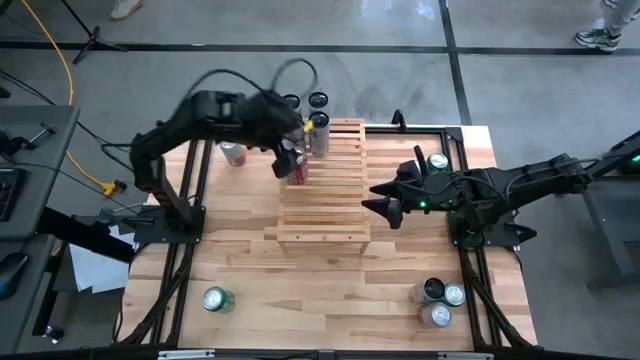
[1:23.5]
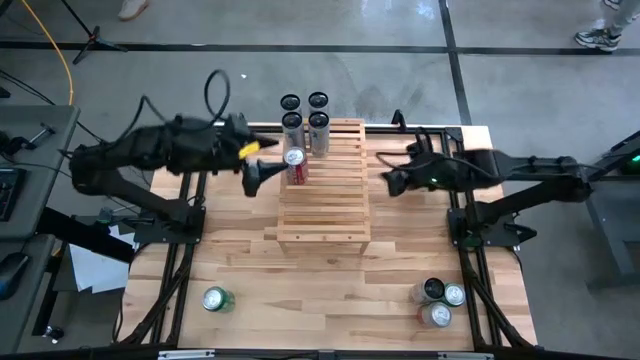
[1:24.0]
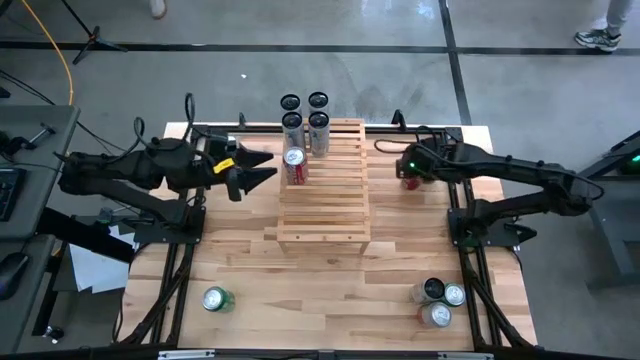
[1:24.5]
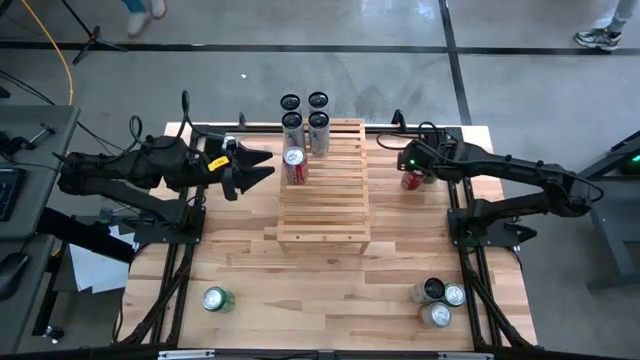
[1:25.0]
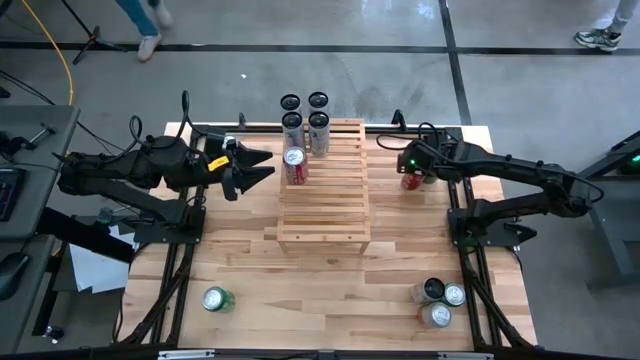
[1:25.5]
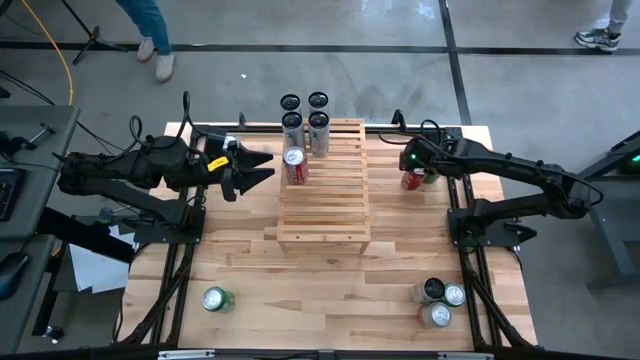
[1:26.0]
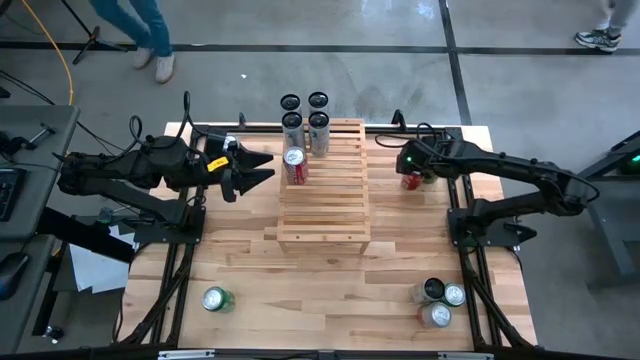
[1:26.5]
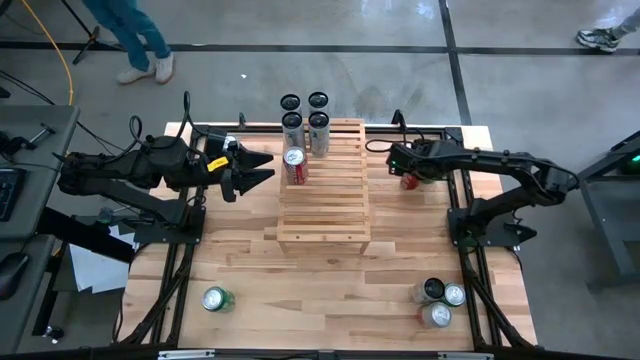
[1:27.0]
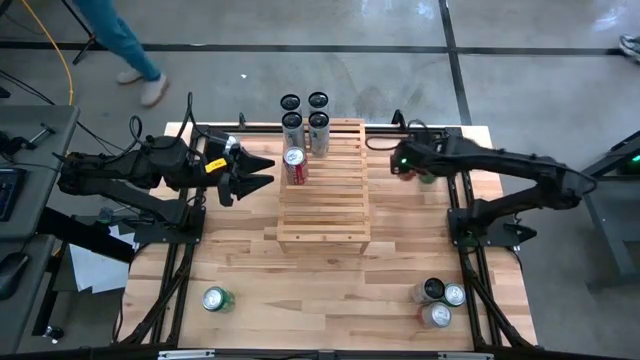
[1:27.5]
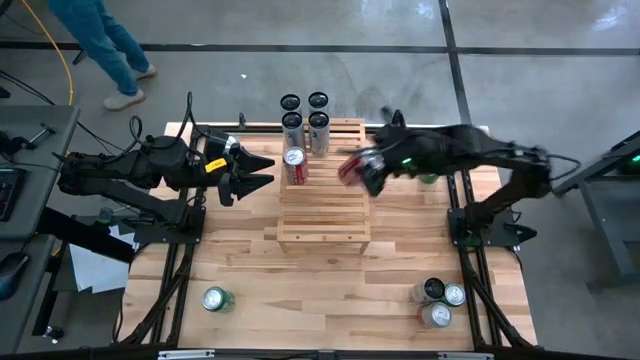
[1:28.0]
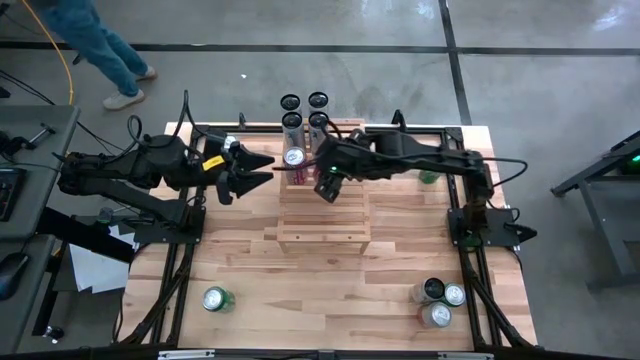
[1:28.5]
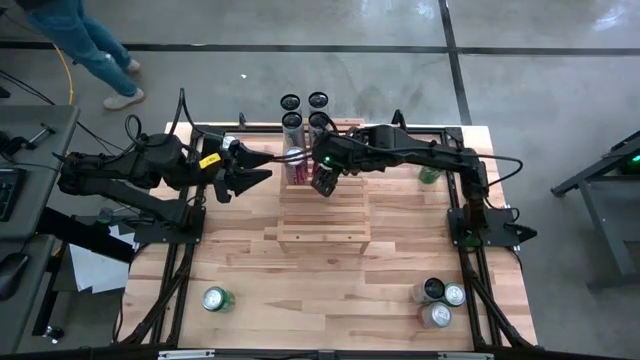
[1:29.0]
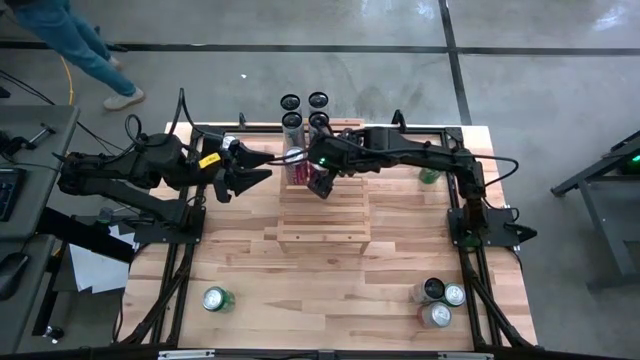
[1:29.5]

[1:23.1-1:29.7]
Task: Place canned beverage on shelf
Put the red soda can on the shelf aligned with the other red soda can

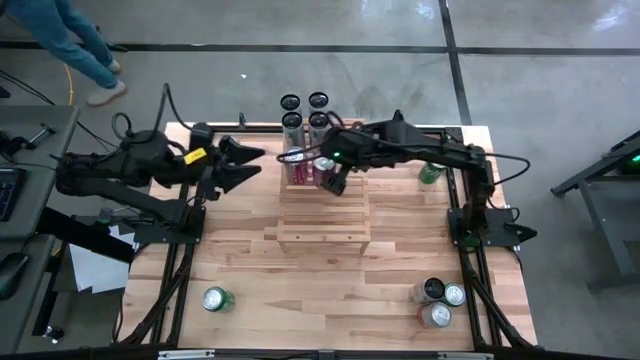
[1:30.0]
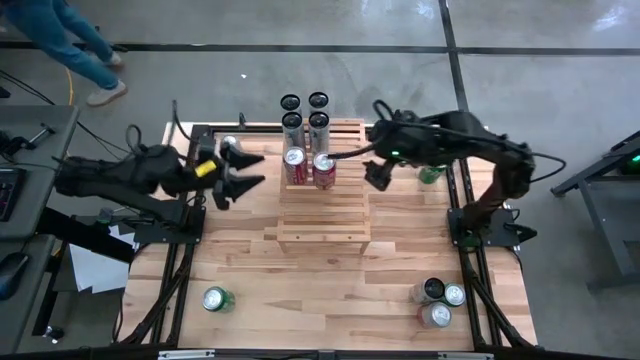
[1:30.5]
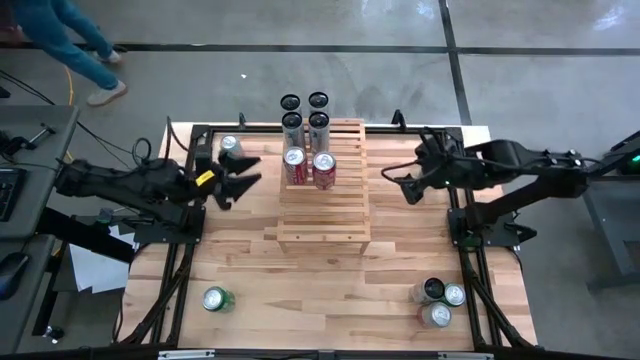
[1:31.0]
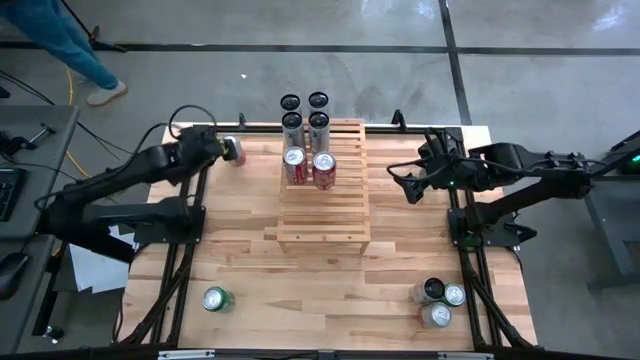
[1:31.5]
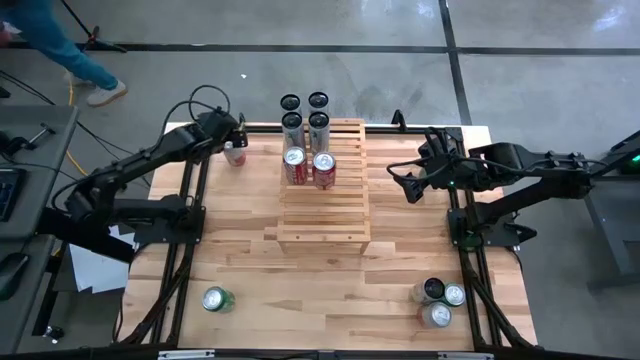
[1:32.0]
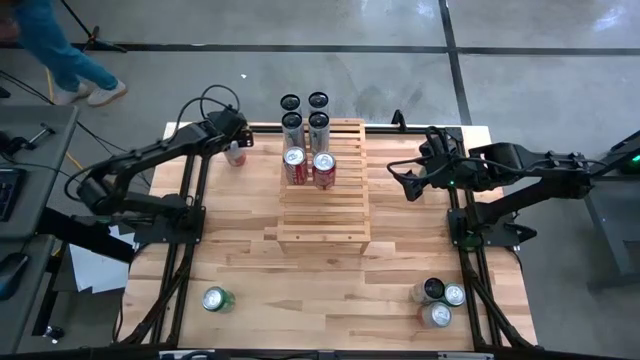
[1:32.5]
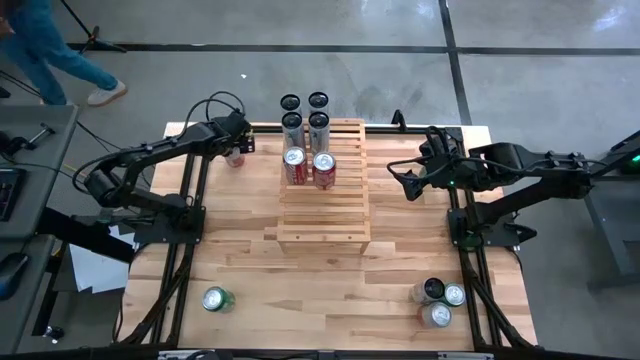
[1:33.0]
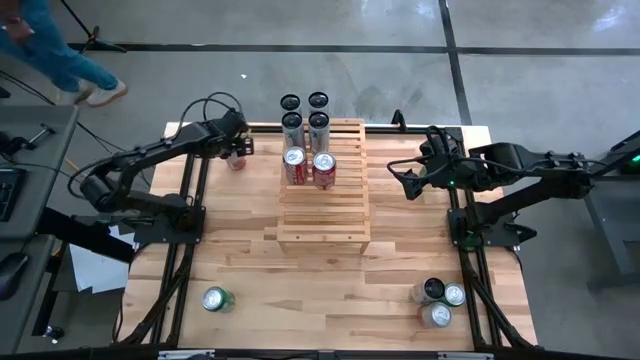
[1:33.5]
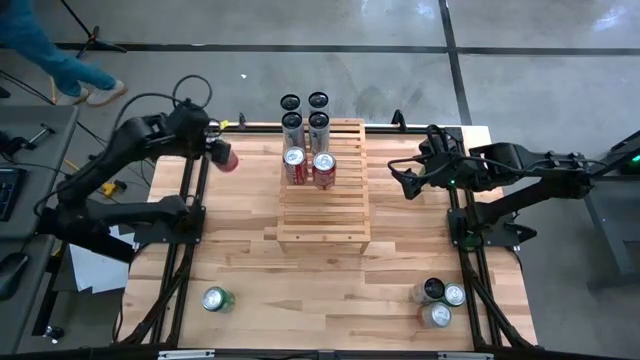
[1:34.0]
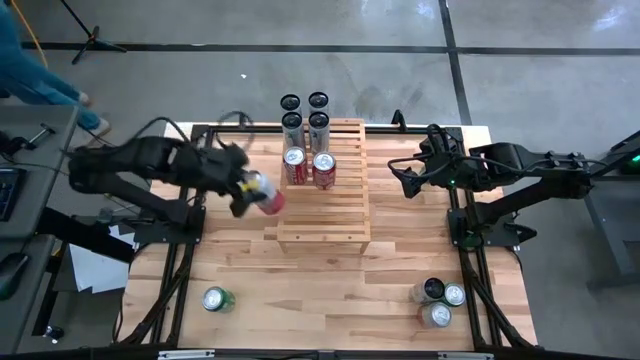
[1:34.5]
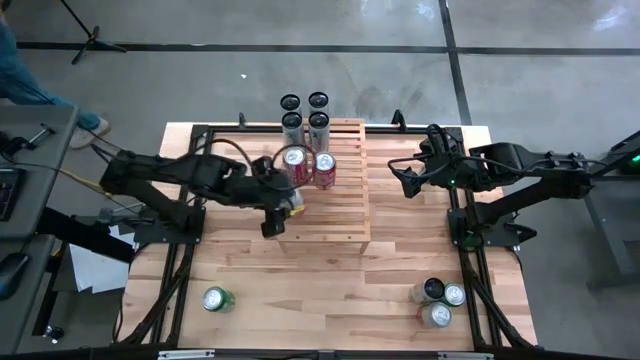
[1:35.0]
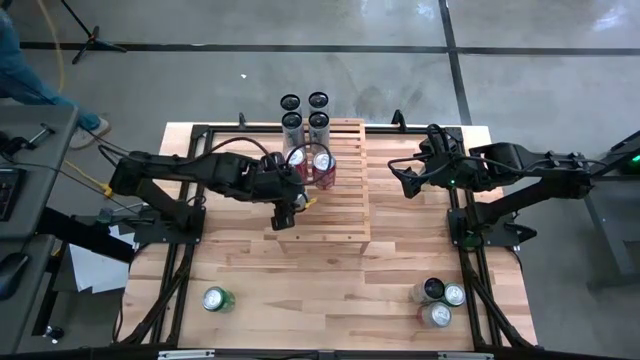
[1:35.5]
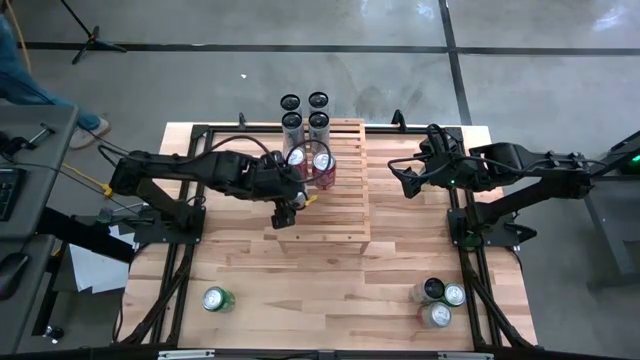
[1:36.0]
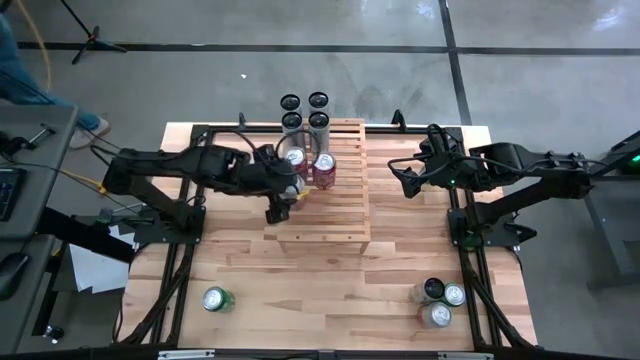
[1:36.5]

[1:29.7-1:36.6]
Put the top pink white soda can on the shelf

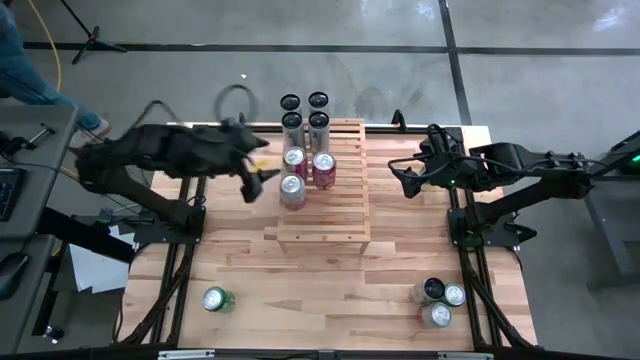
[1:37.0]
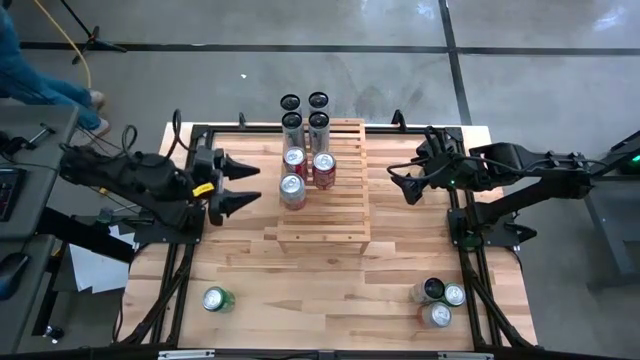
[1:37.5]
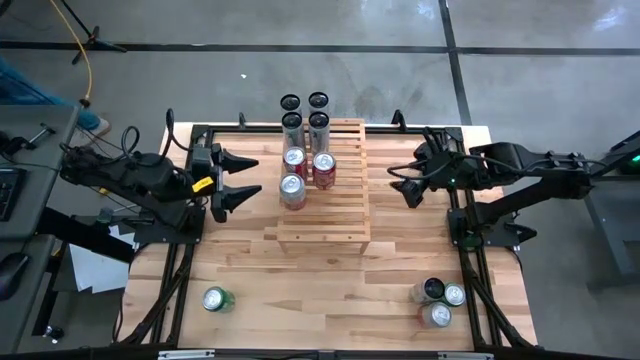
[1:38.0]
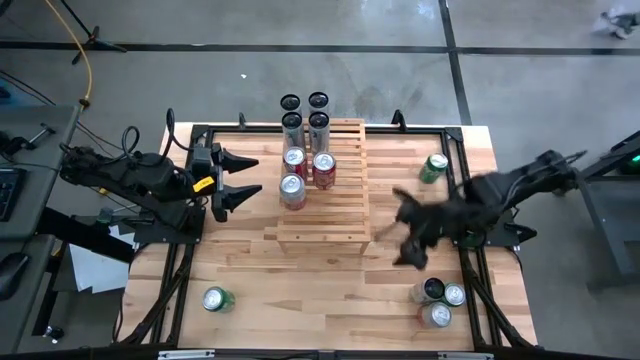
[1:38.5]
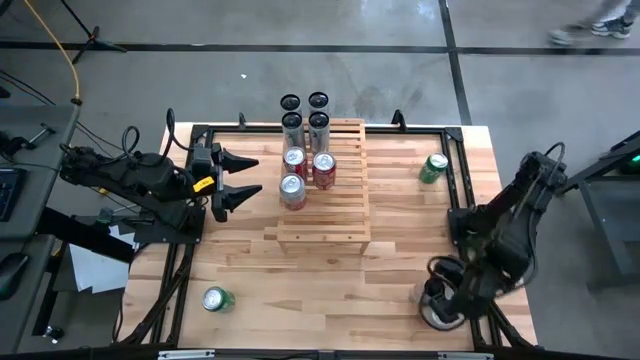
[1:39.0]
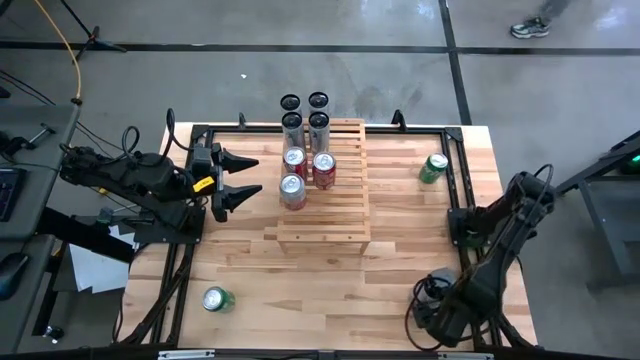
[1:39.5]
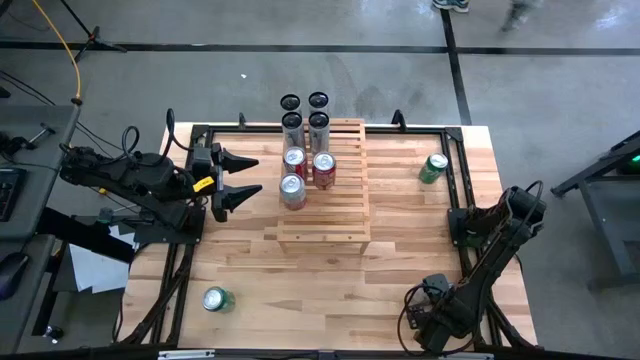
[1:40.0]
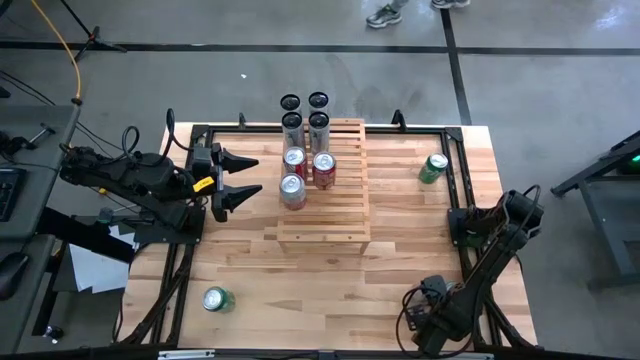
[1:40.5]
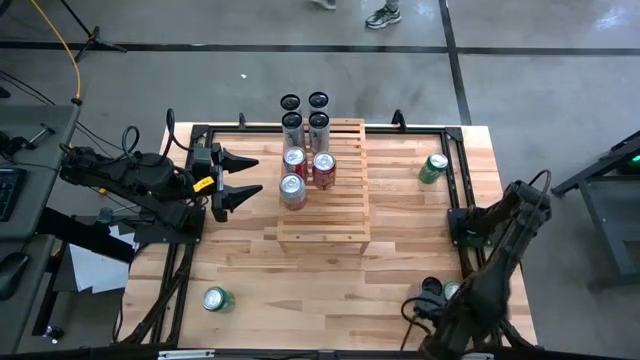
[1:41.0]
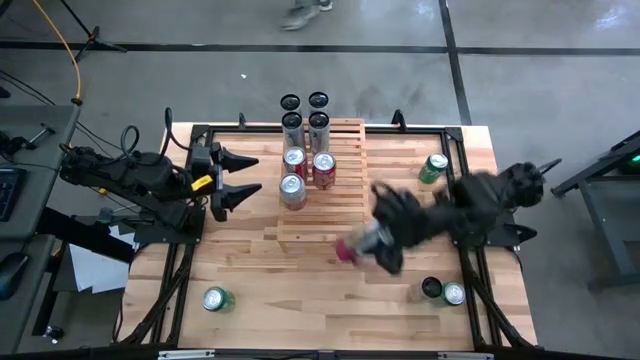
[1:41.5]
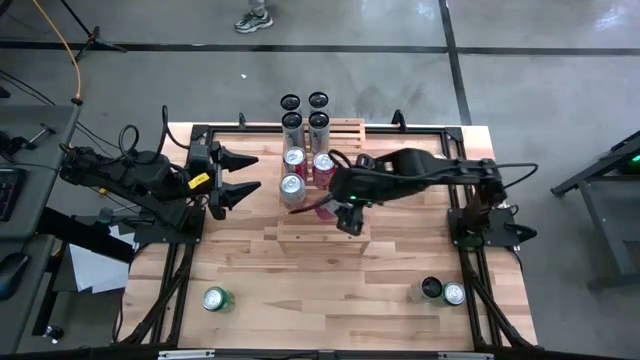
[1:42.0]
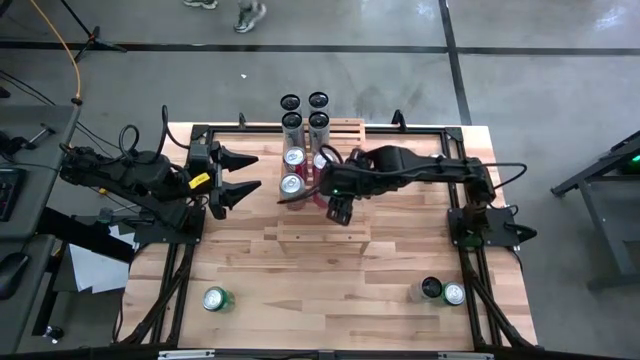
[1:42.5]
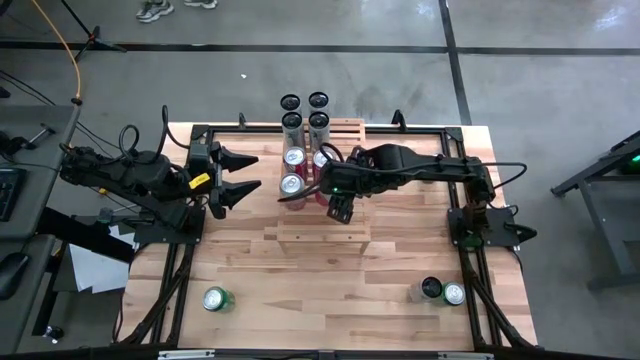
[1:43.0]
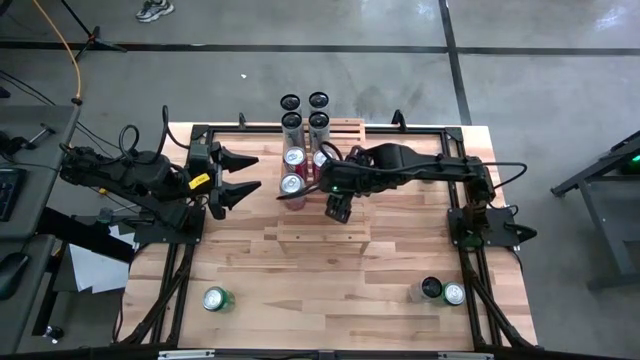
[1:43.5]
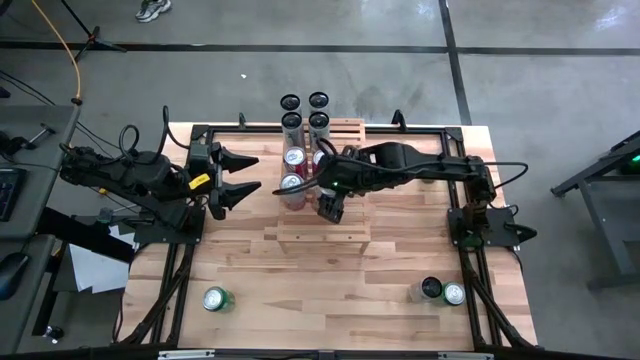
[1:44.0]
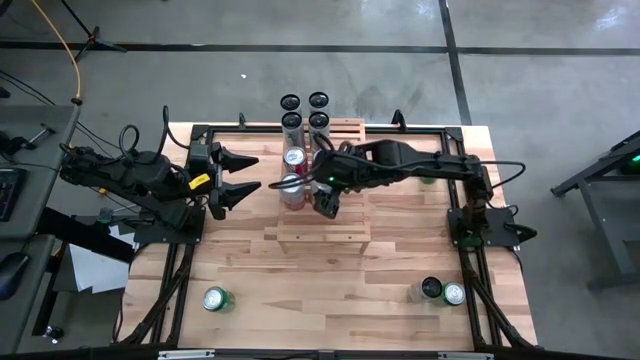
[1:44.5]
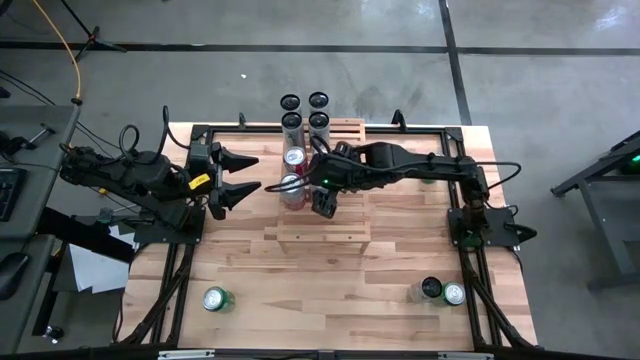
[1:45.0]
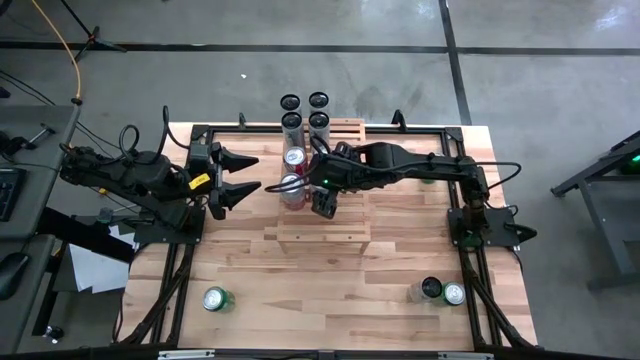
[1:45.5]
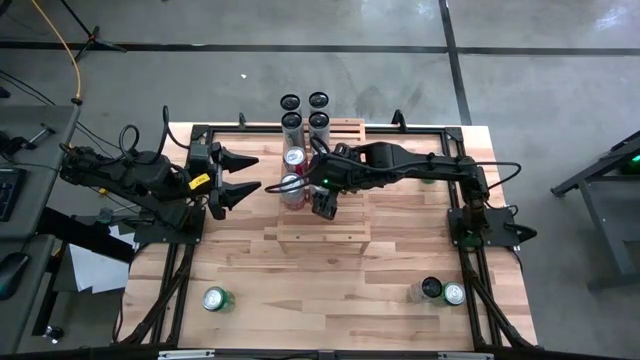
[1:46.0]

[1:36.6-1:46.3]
Put the pink white soda can on the shelf aligned with the other pink white soda can
